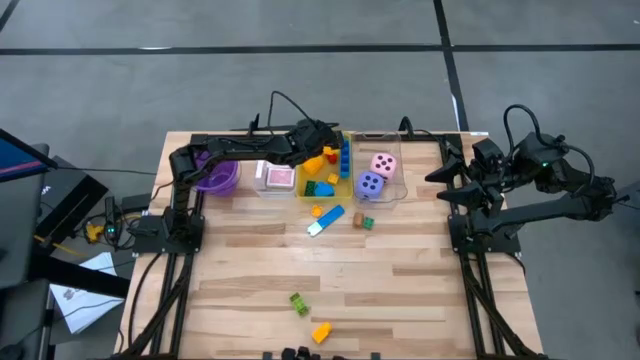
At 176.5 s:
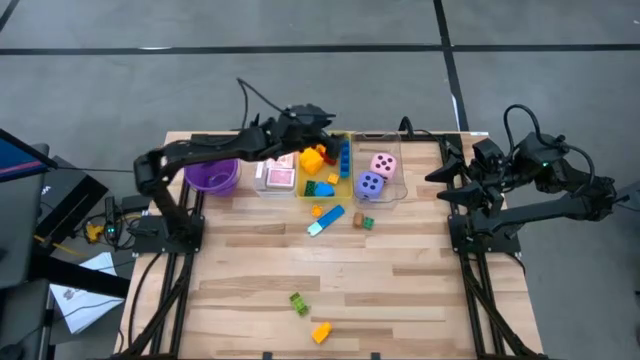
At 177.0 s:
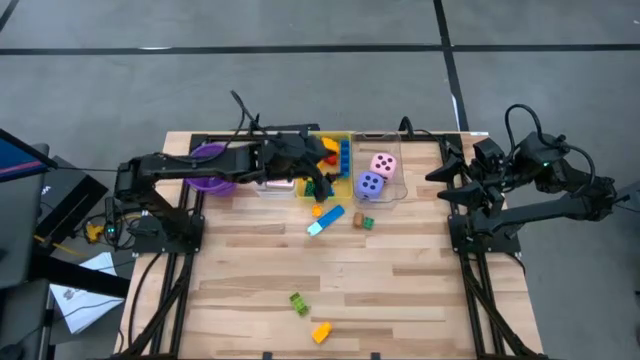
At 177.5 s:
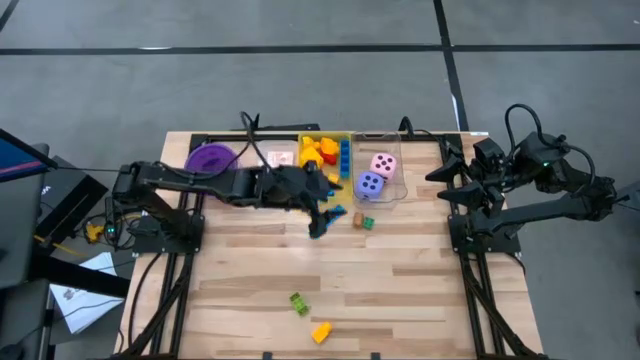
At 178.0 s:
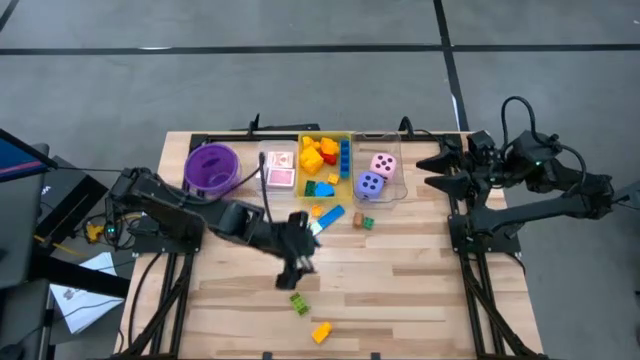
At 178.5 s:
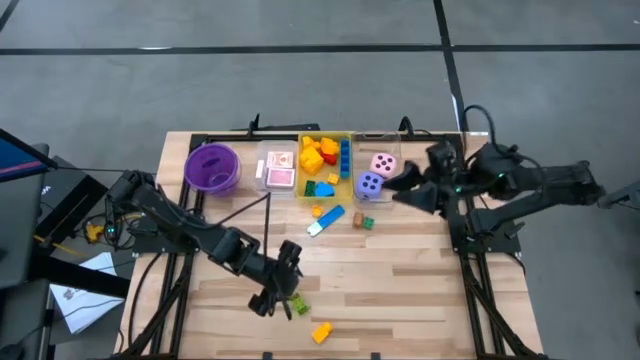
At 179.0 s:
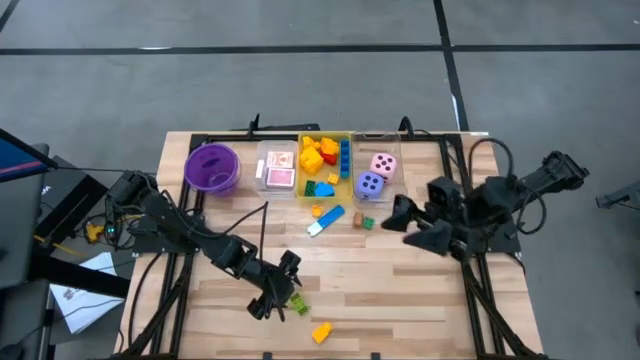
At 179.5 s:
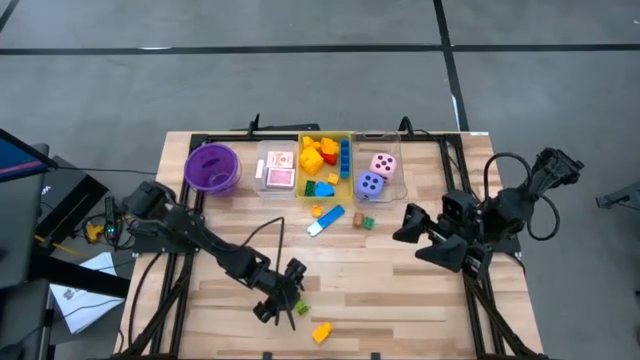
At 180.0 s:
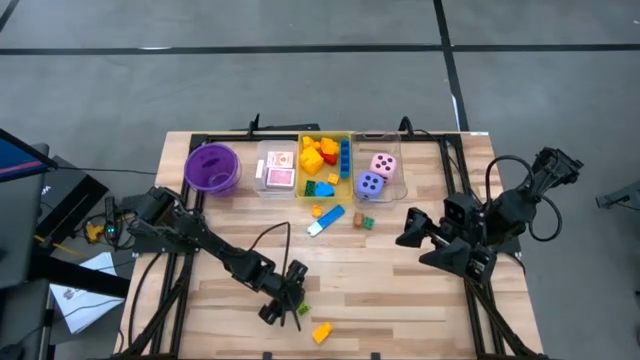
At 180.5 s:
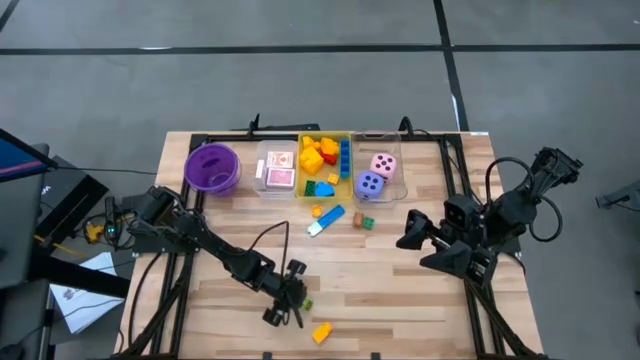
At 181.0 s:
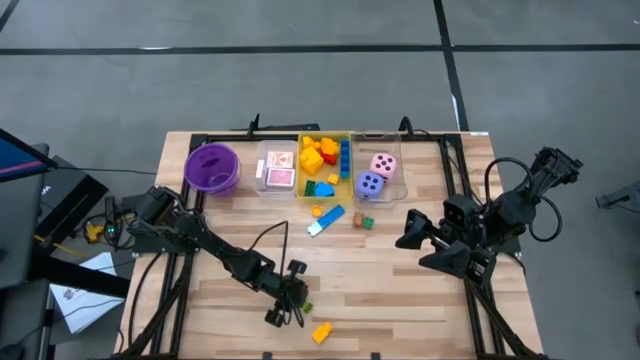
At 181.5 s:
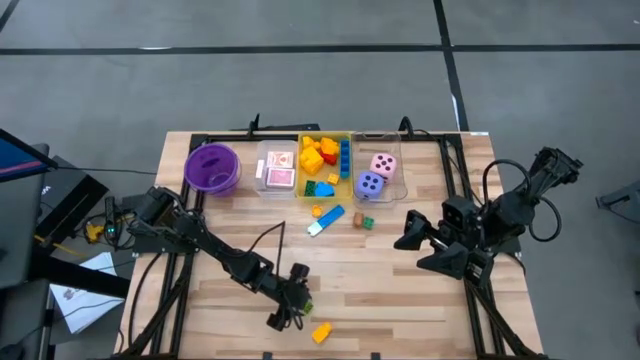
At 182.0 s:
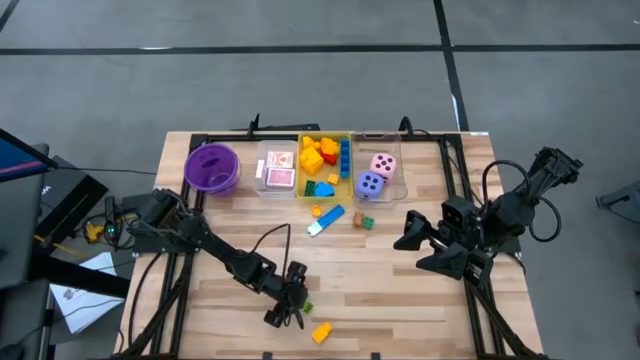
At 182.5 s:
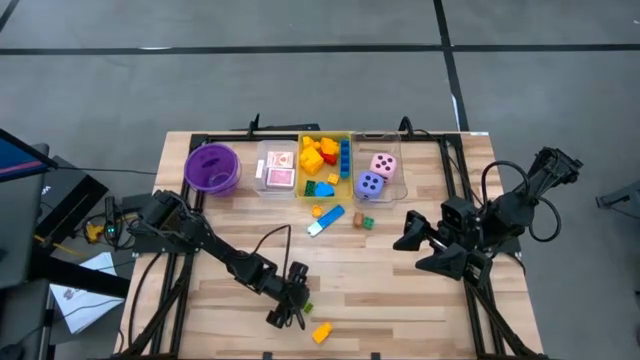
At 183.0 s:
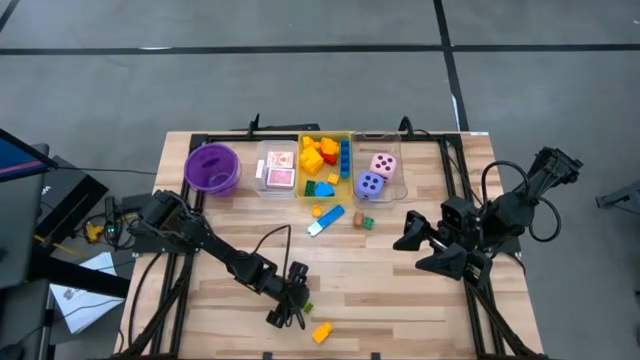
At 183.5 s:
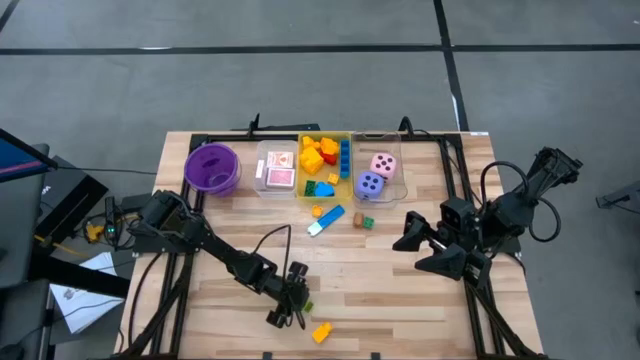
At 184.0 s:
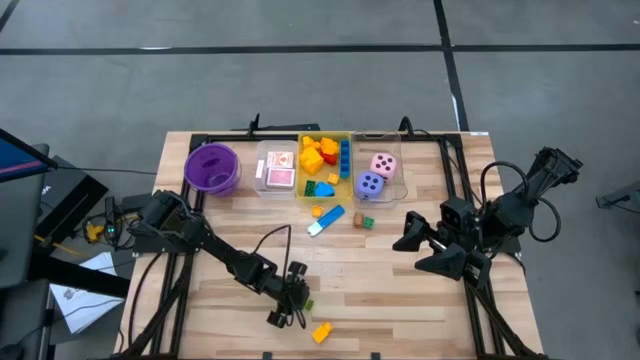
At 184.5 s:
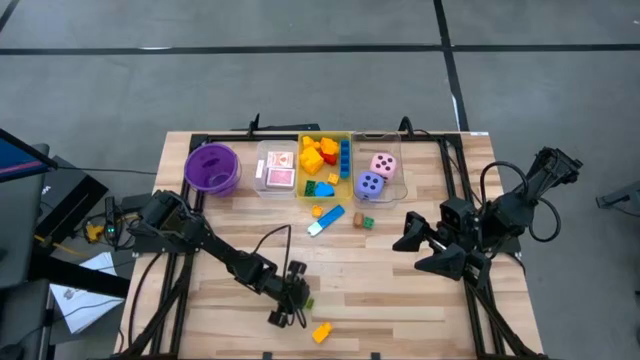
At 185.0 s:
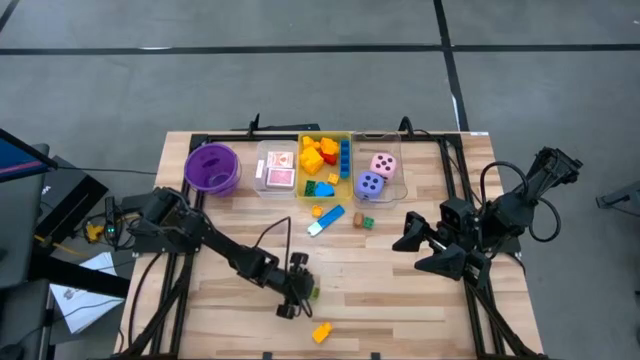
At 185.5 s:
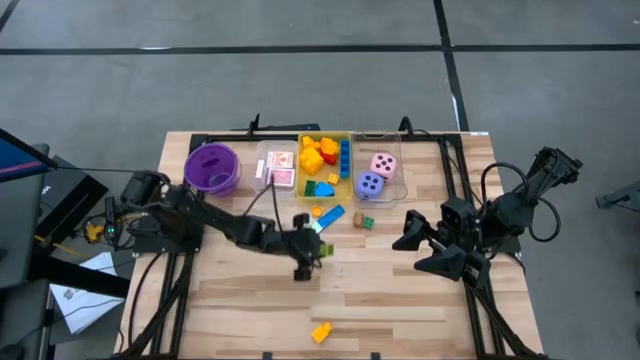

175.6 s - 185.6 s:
Task: Pick & Place Toys
Put the green gamepiece into the yellow bin

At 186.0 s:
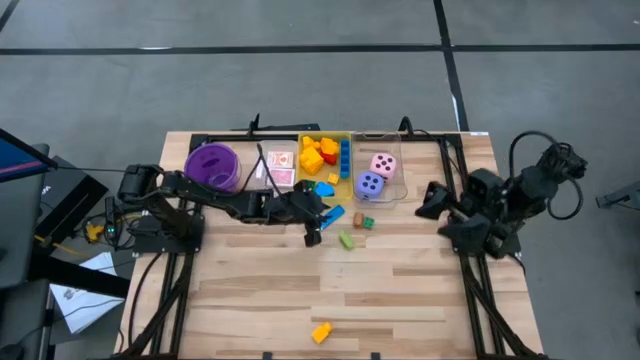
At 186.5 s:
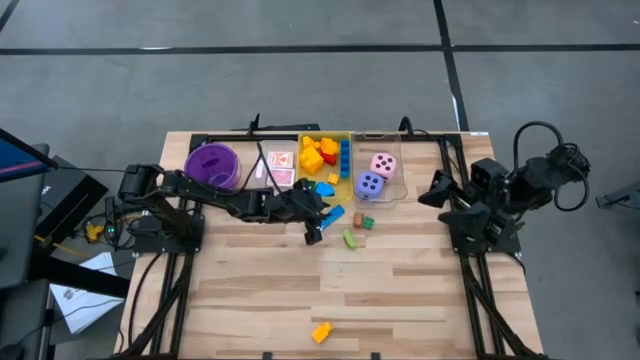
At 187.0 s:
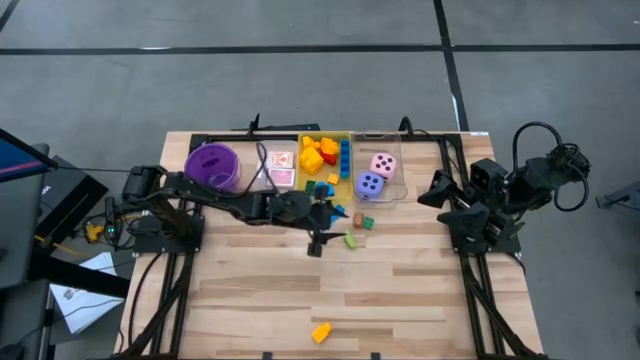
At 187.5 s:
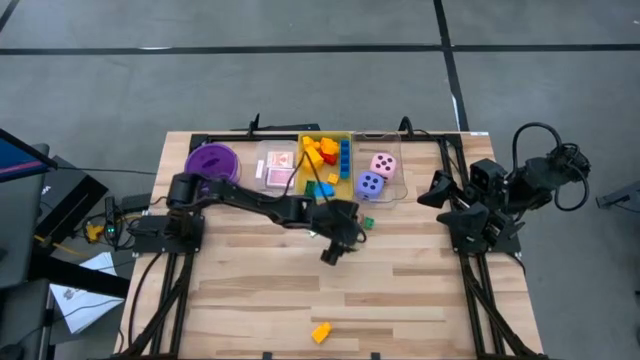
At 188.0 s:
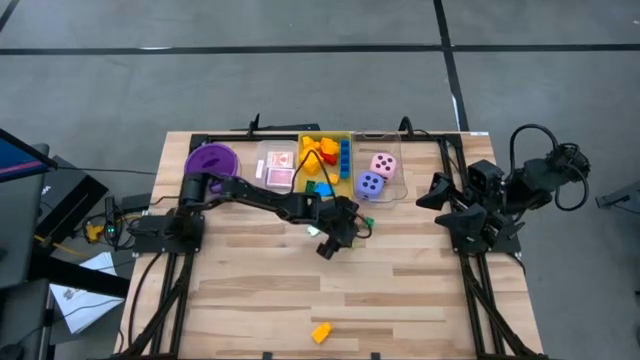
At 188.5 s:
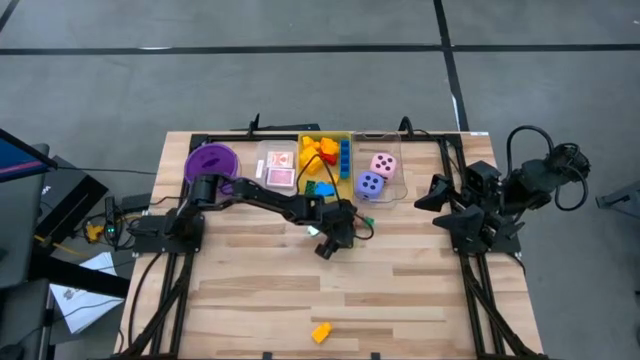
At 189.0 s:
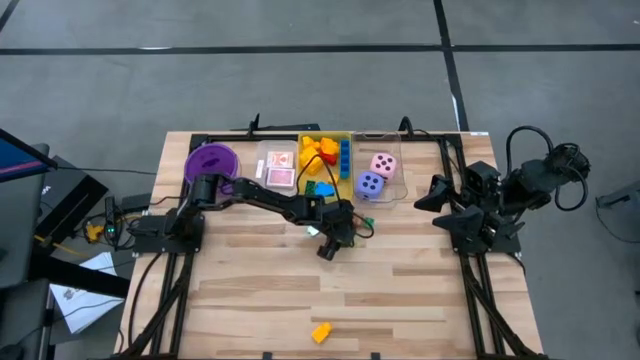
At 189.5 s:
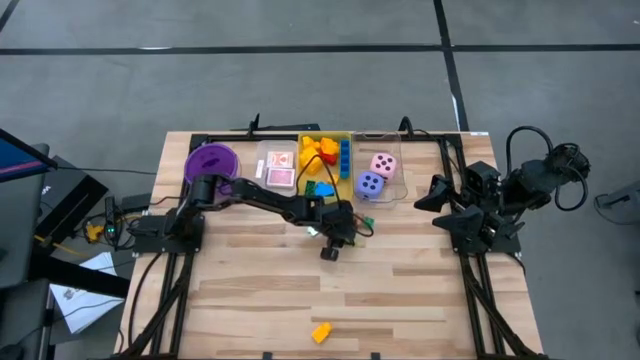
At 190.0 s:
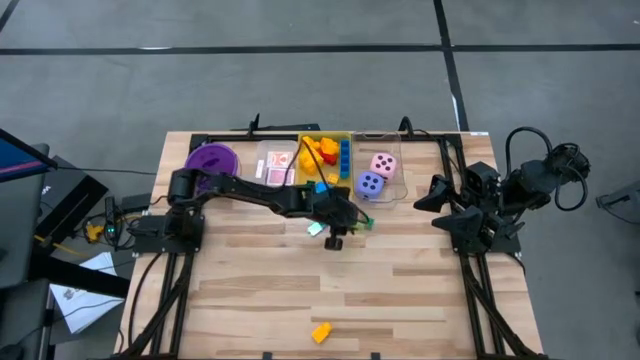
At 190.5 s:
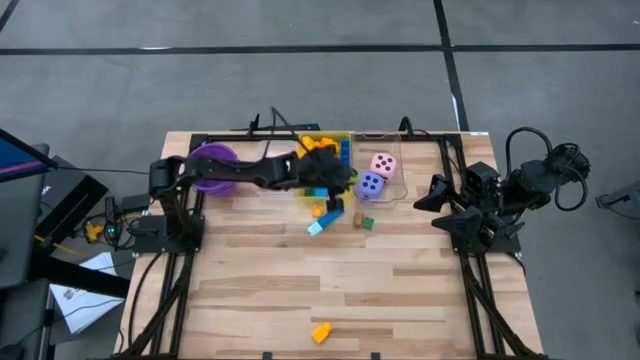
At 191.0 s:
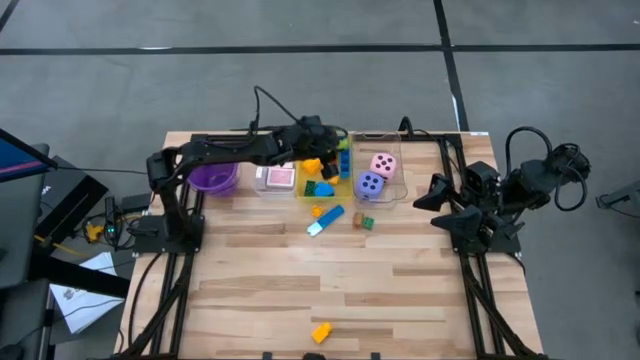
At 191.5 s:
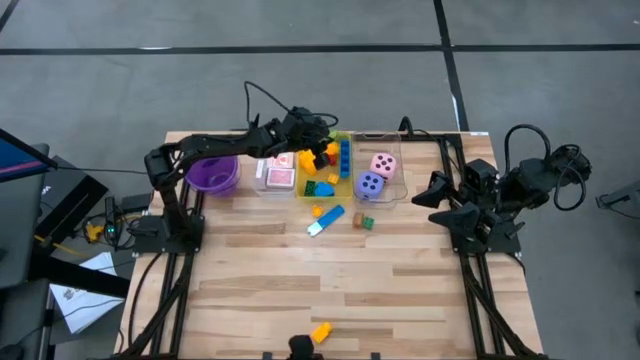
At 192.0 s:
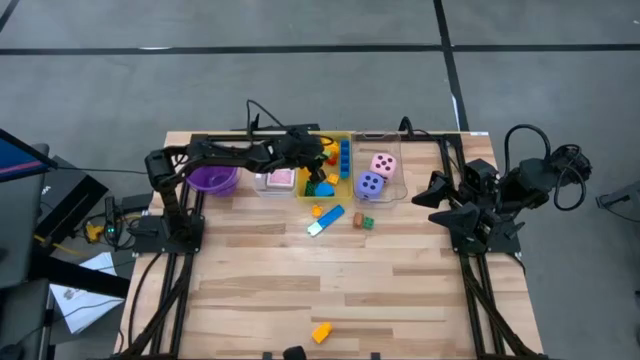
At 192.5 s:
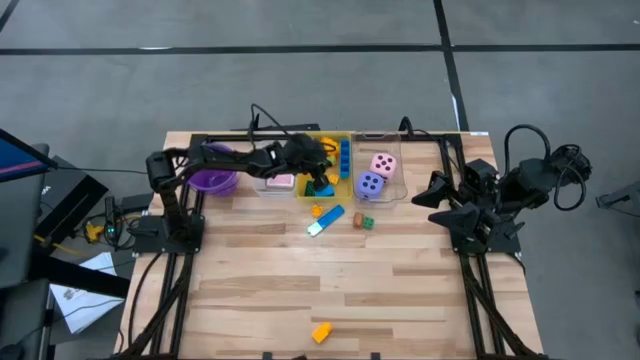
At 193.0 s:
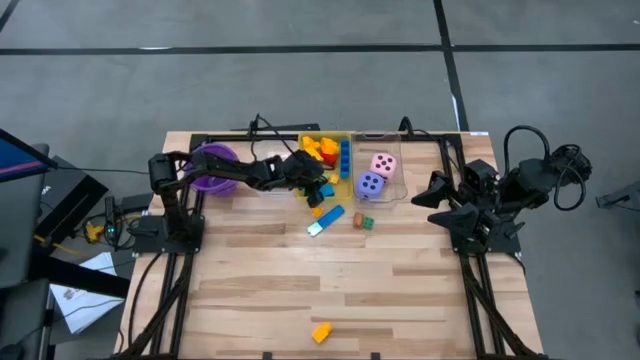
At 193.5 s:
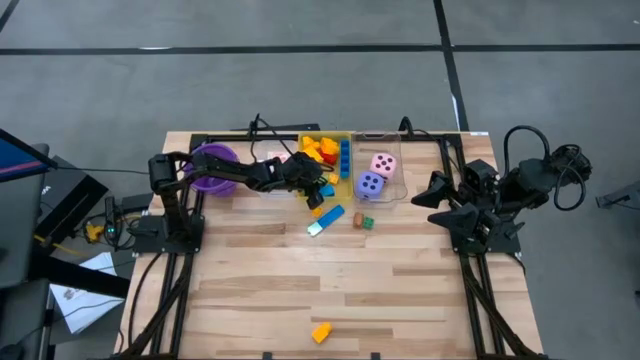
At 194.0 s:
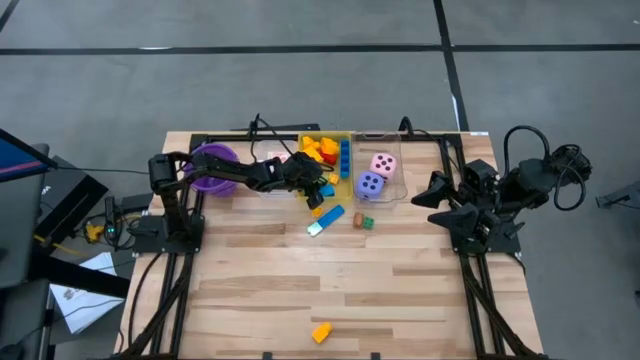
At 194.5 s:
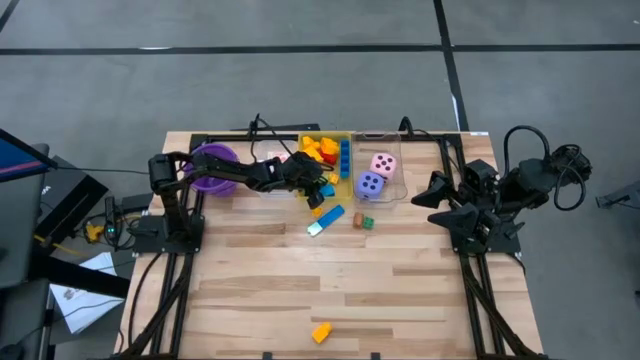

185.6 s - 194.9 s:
Put the green gamepiece into the yellow bin

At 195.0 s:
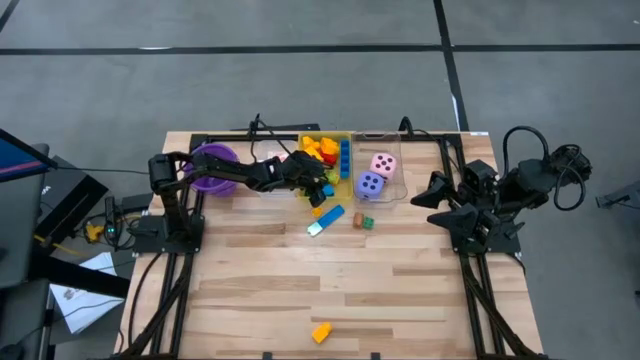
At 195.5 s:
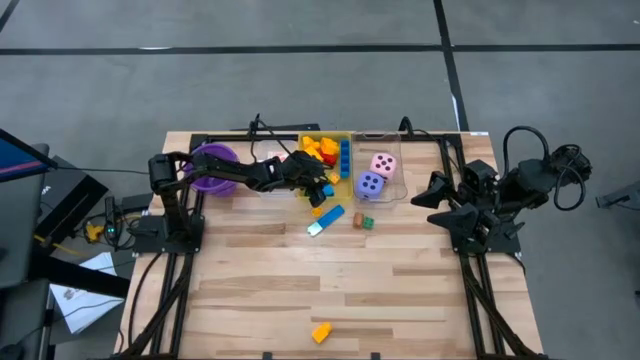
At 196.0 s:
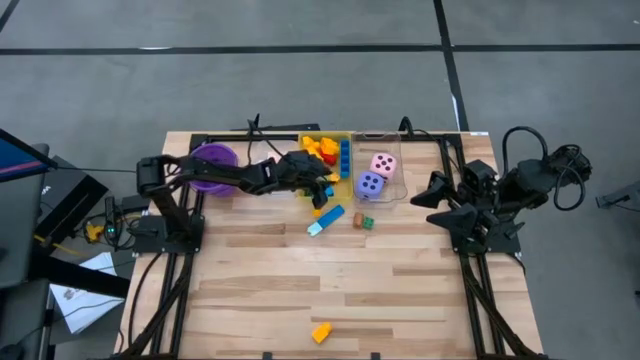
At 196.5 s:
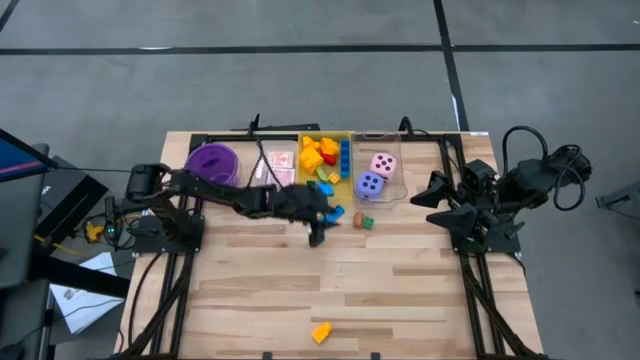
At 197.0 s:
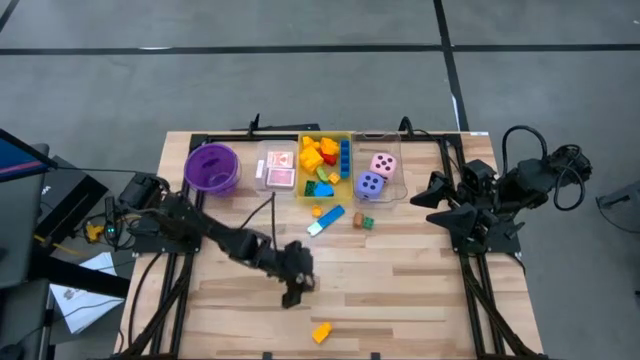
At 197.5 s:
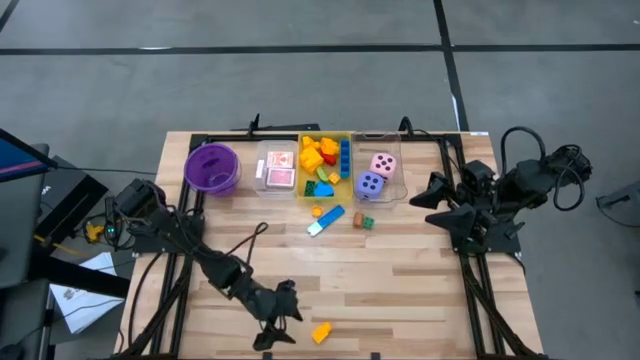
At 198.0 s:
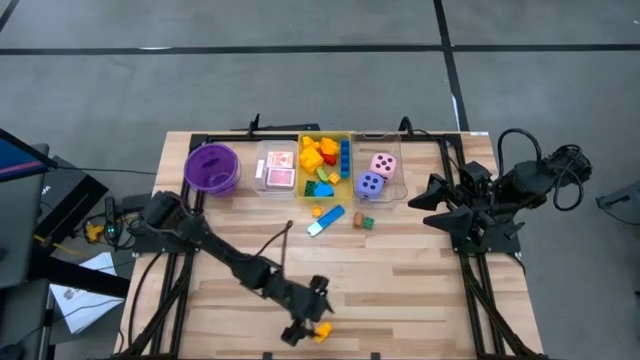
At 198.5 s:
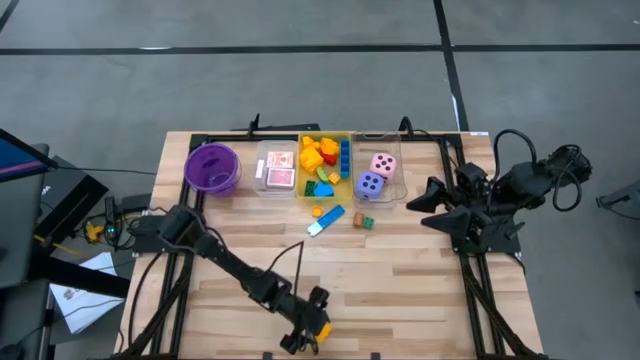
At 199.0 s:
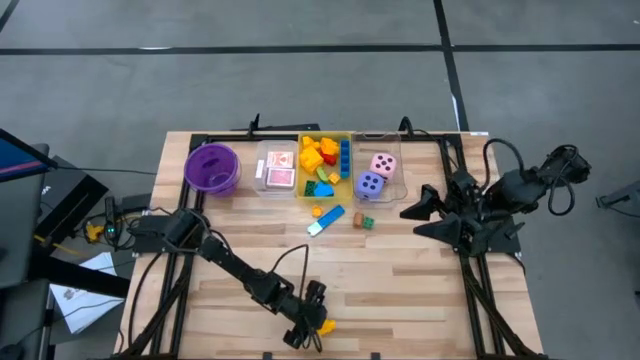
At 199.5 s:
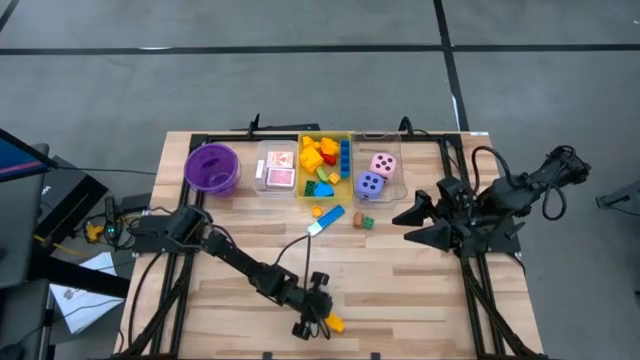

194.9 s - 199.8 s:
Put the yellow gamepiece into the yellow bin
